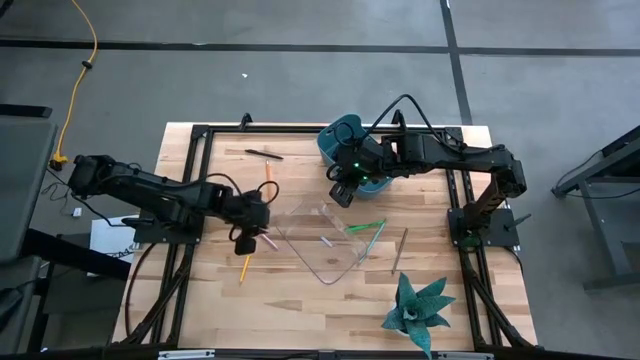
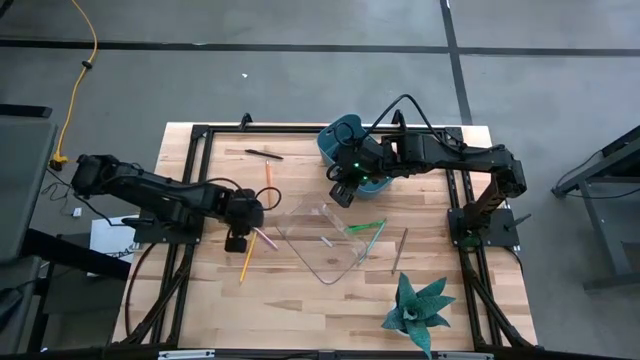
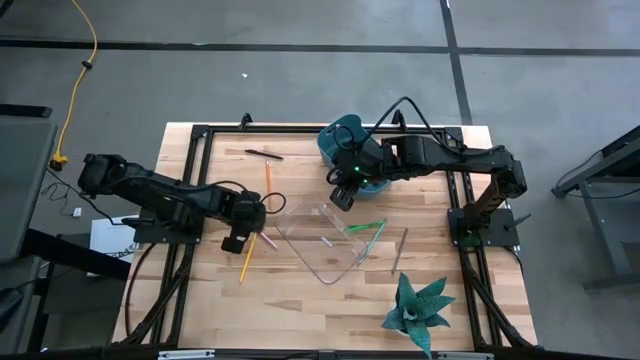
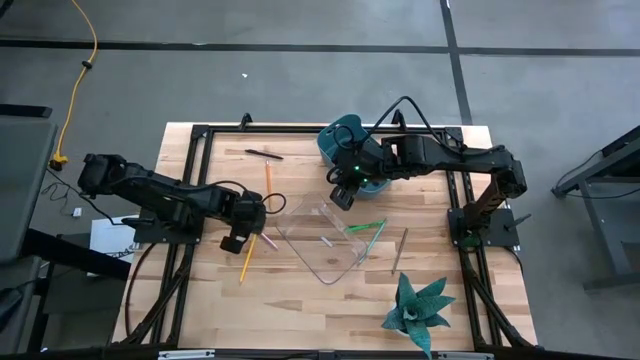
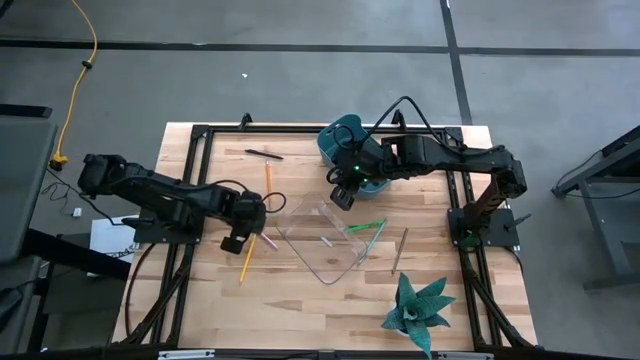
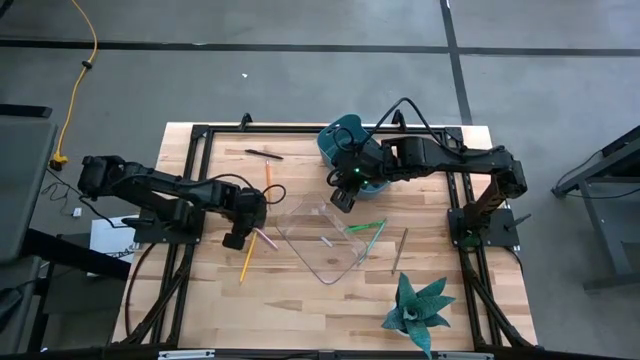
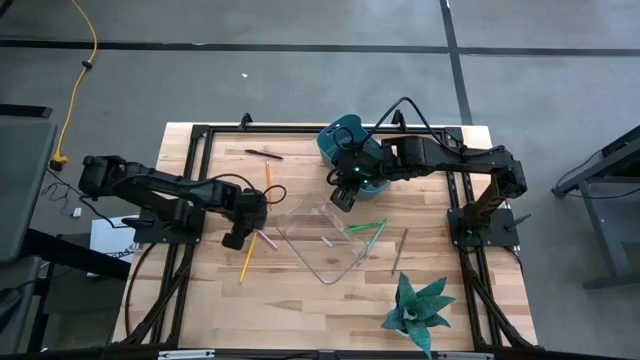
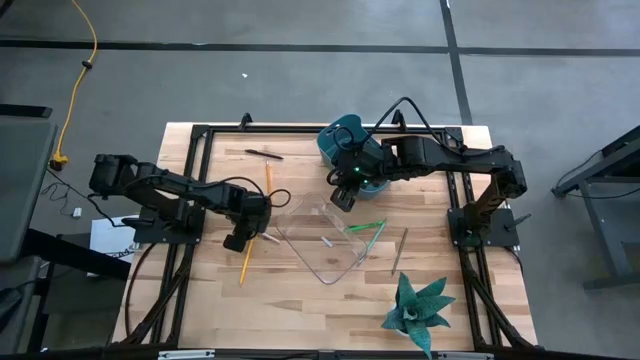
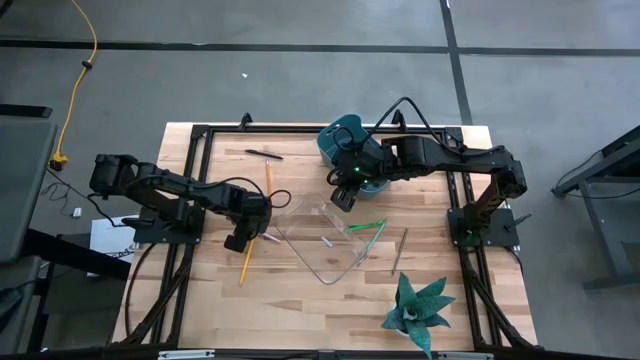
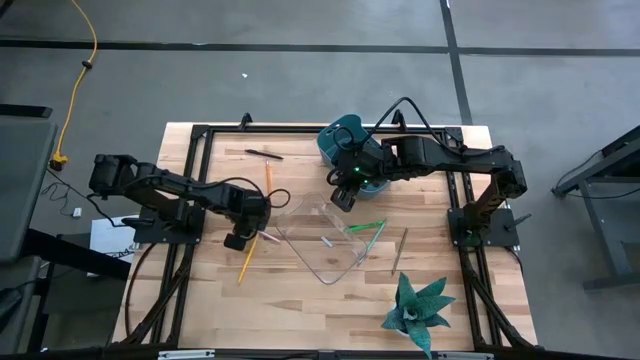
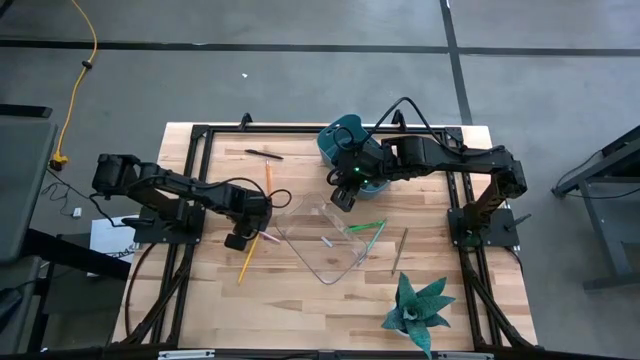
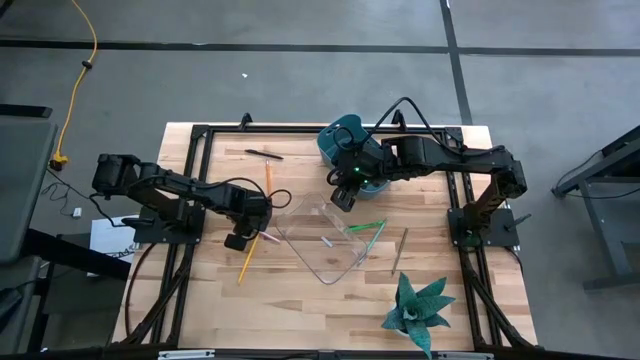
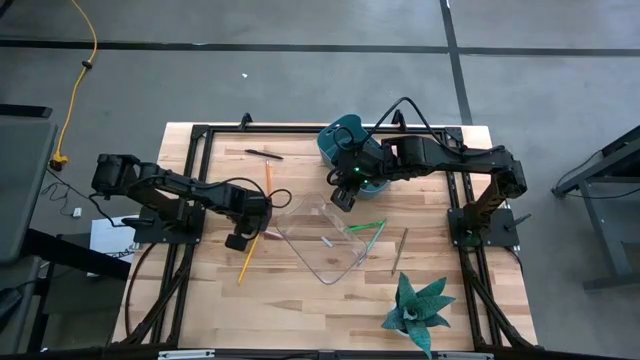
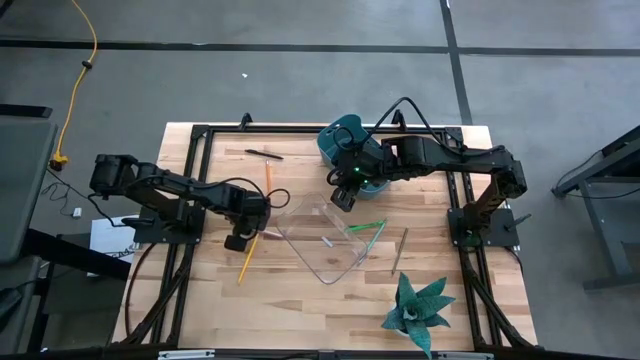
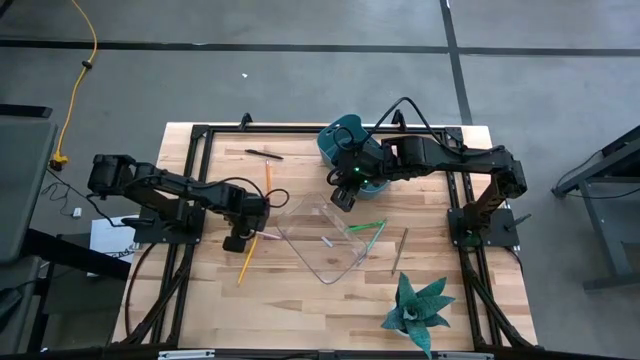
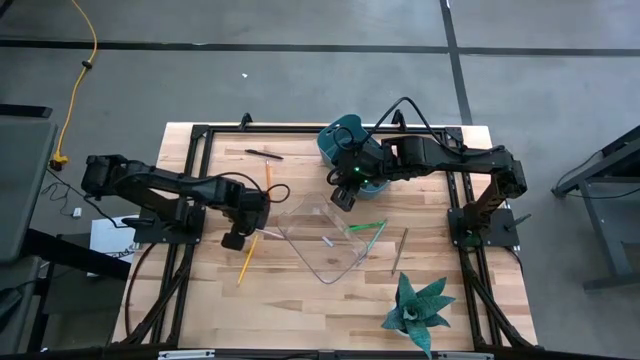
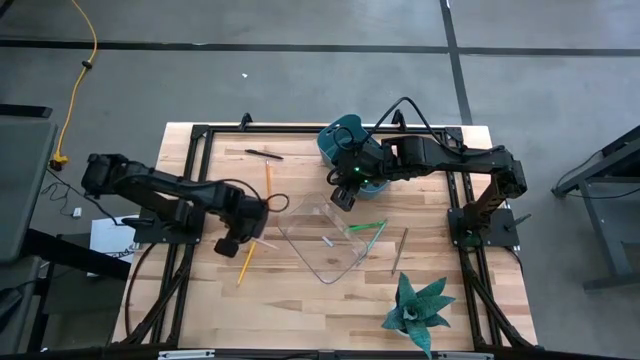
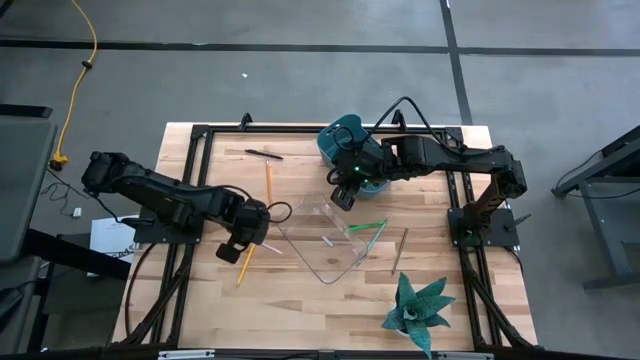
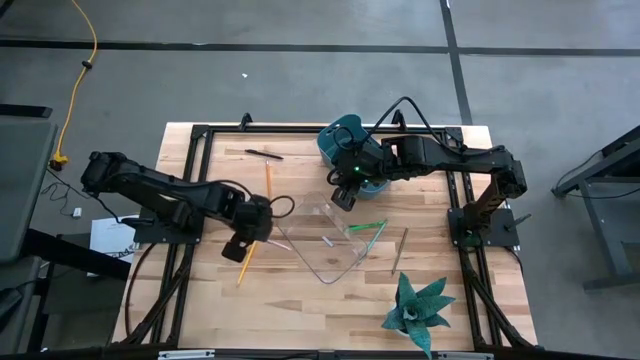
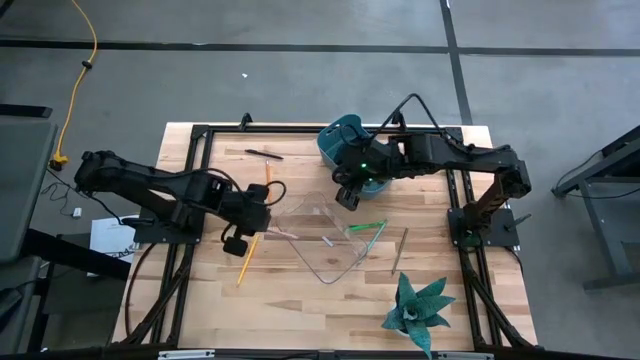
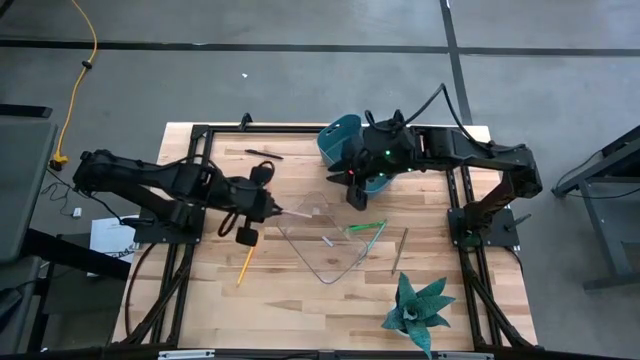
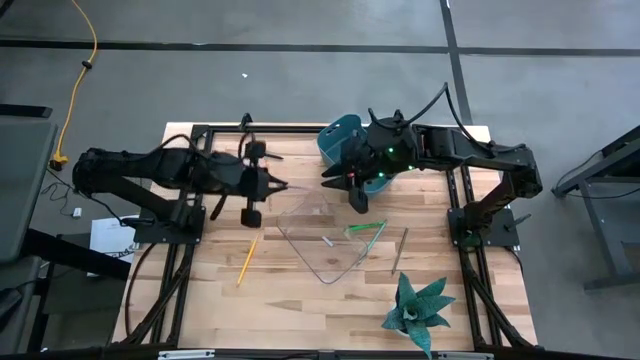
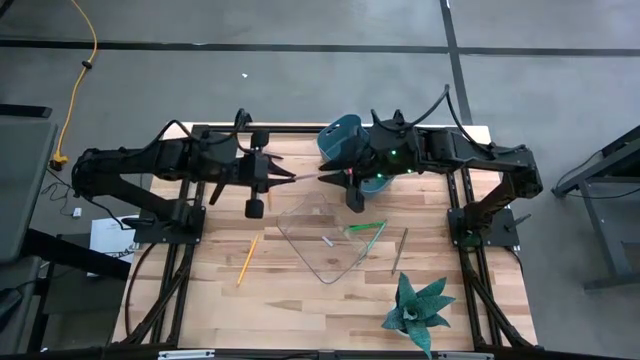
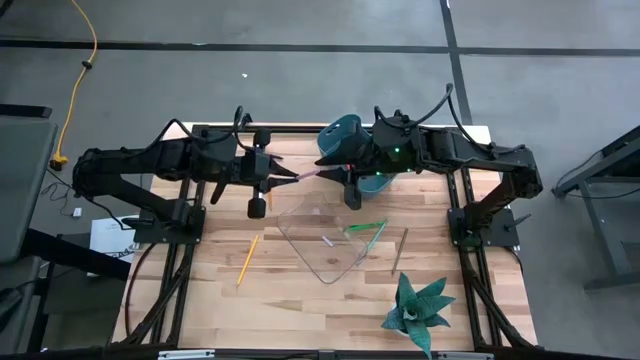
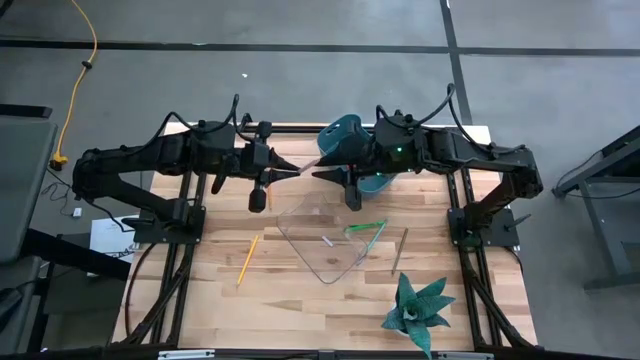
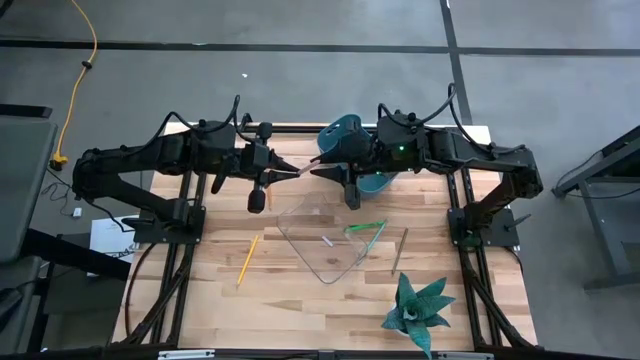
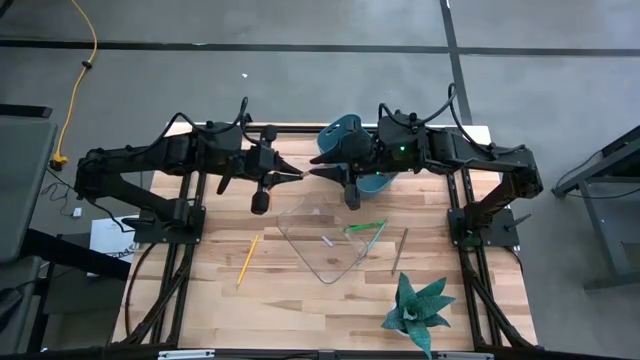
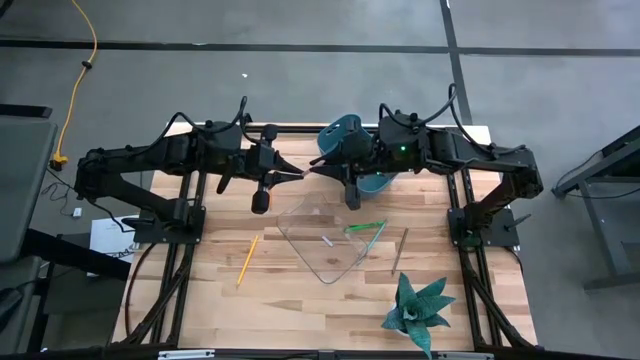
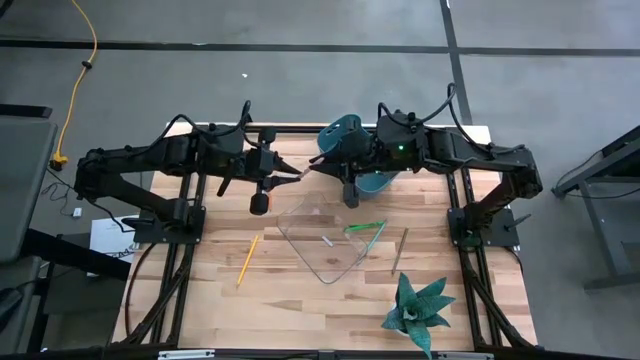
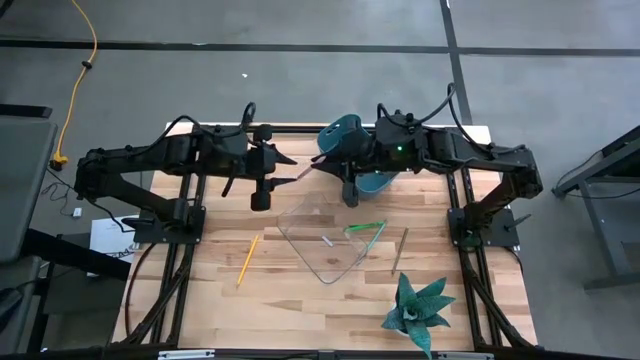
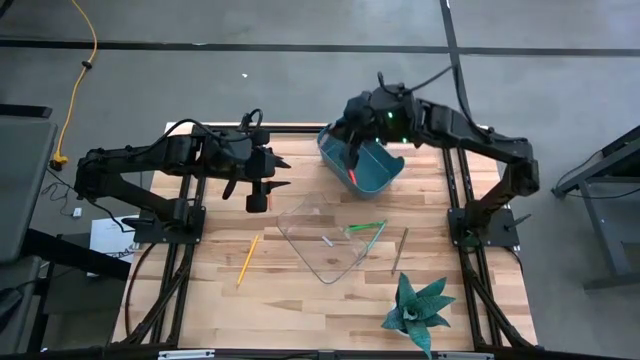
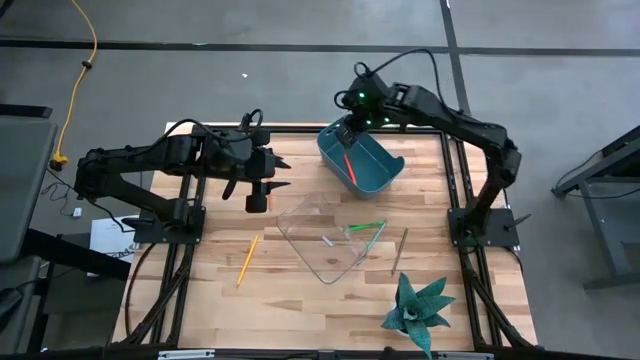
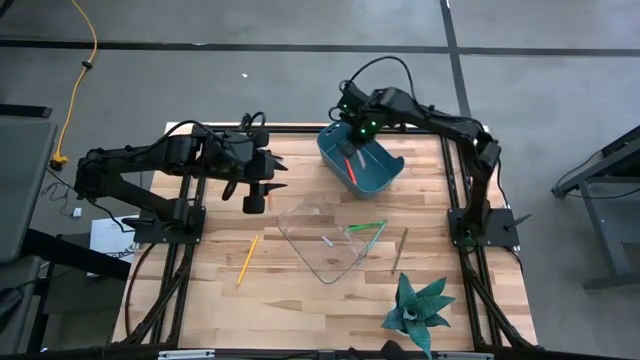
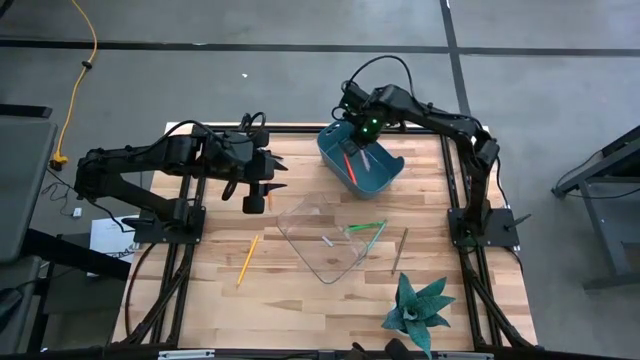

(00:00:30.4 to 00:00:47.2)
Task: Sort pens & pencils
Put the pink pen into the blue bin

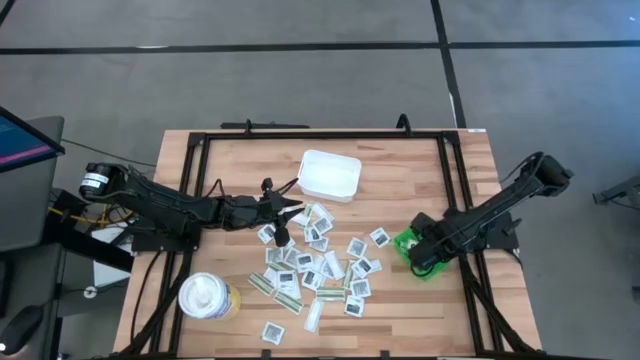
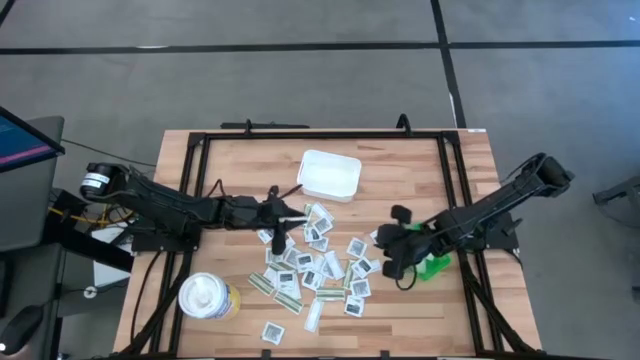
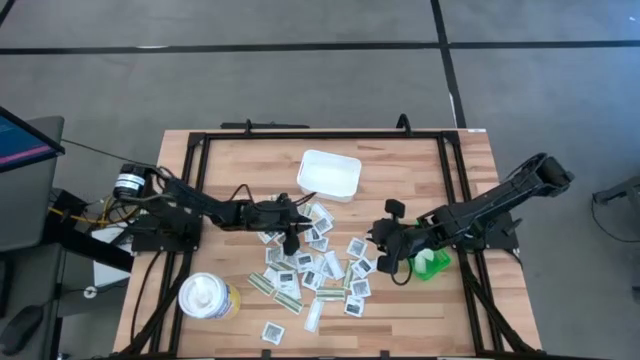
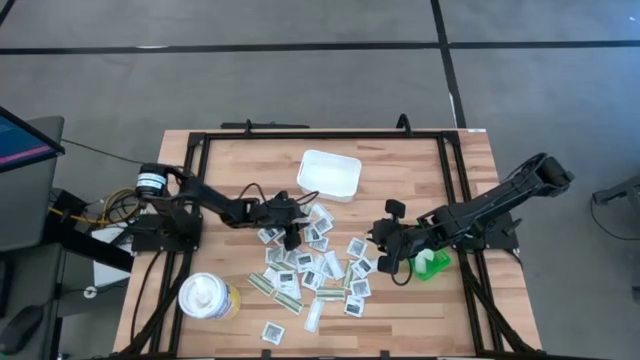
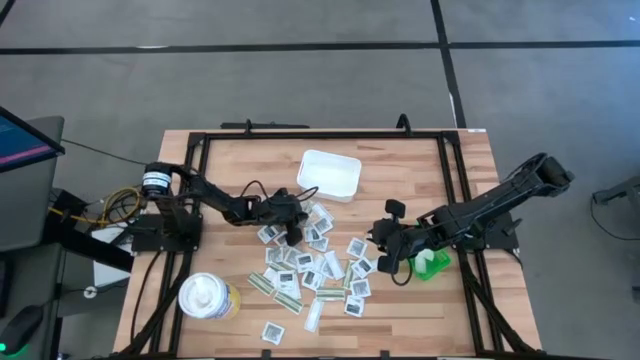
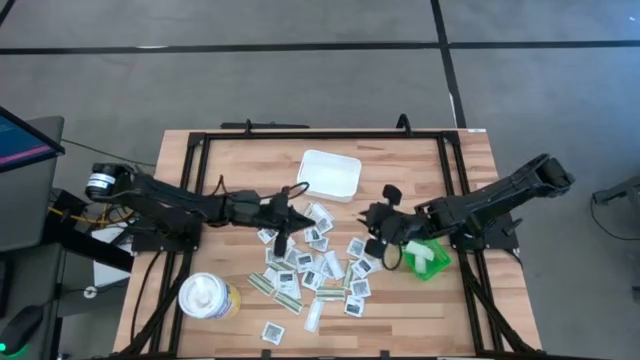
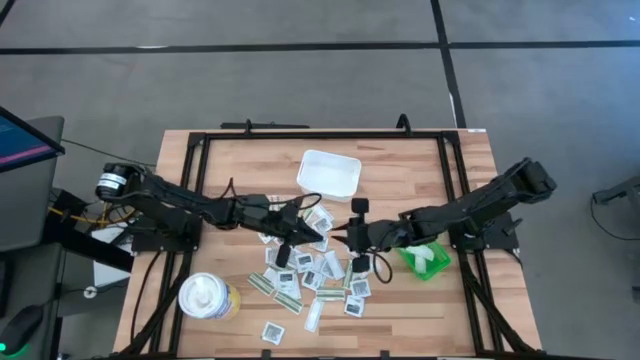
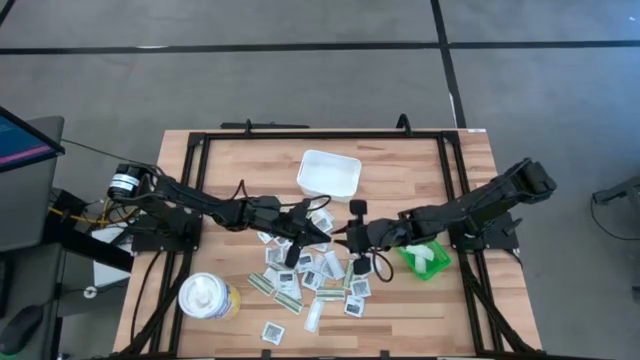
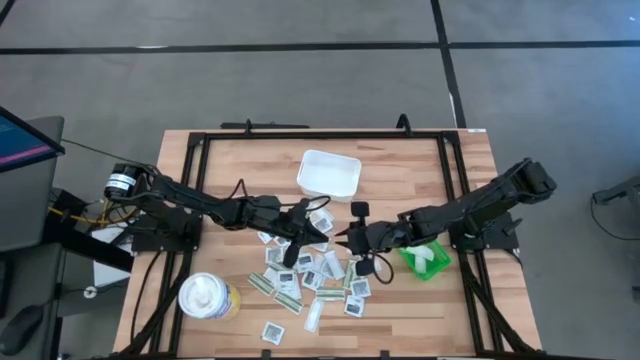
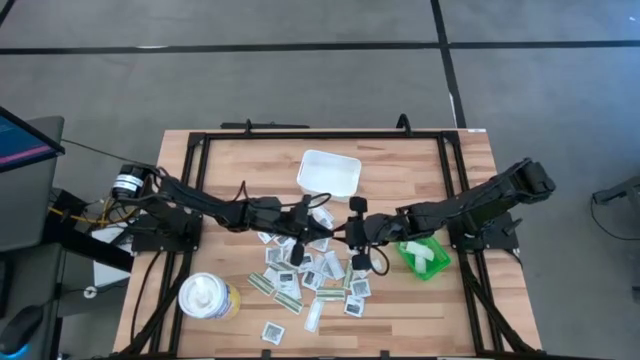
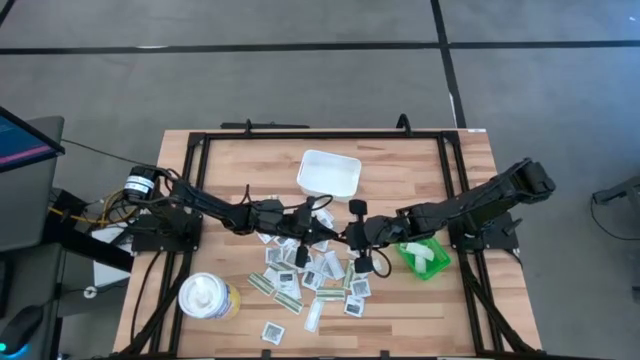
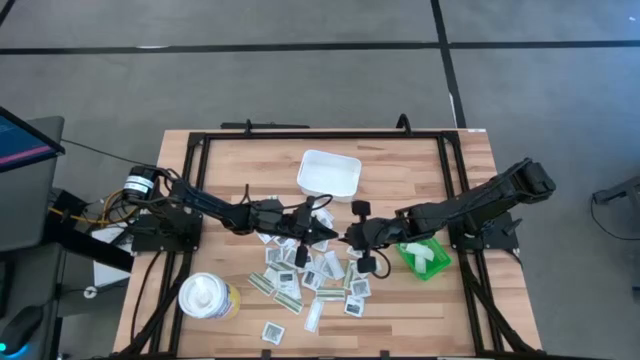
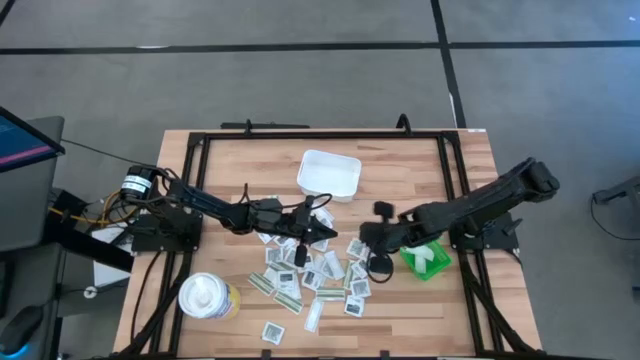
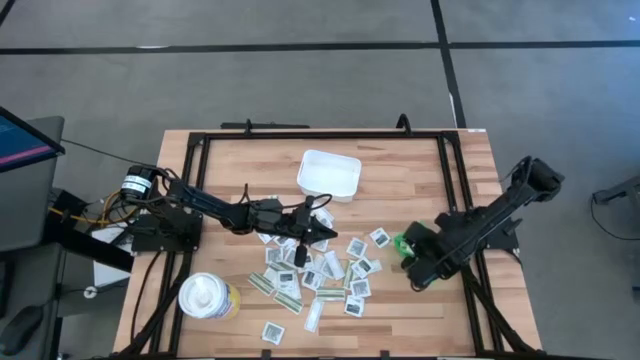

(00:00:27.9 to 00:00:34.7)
Task: Pick & Place First Aid Supplies
Put the bandage pack into the green bin
